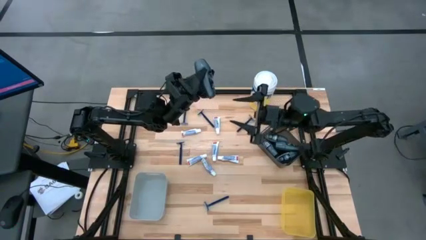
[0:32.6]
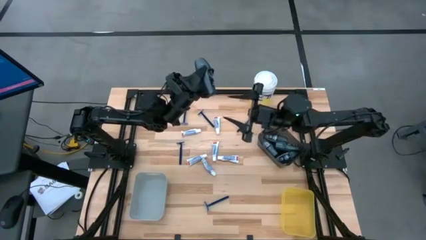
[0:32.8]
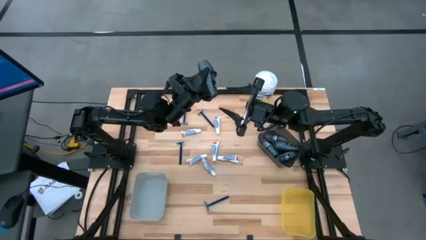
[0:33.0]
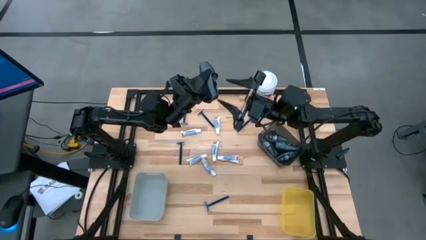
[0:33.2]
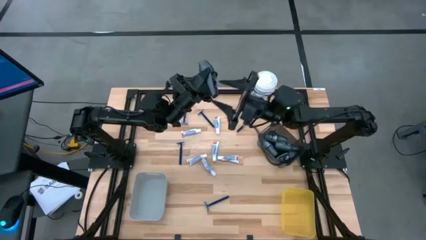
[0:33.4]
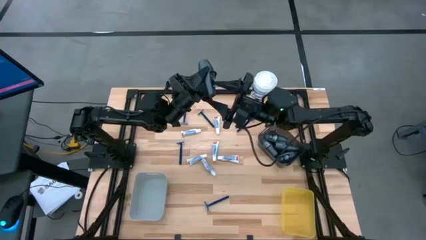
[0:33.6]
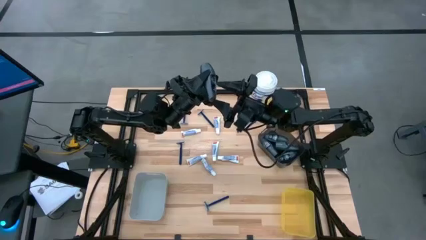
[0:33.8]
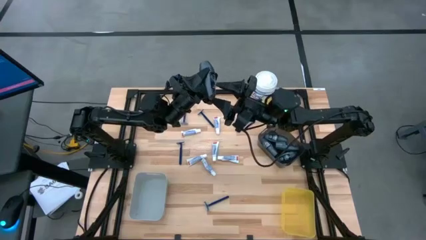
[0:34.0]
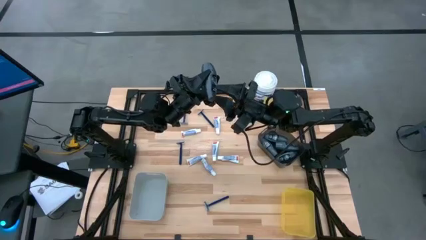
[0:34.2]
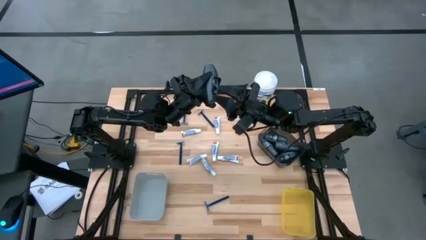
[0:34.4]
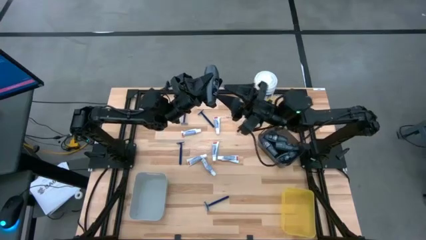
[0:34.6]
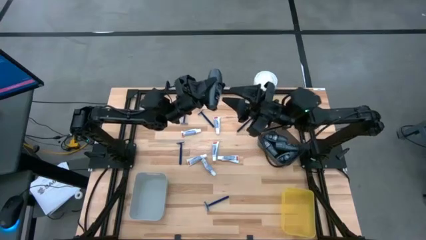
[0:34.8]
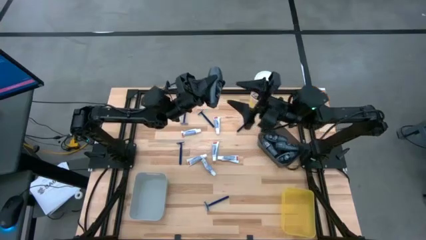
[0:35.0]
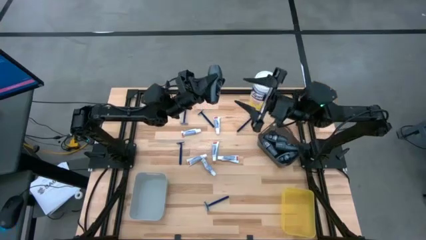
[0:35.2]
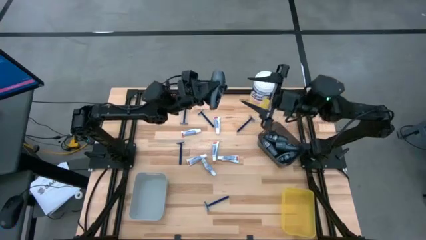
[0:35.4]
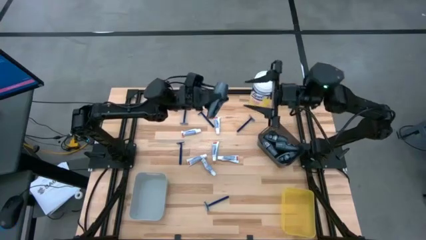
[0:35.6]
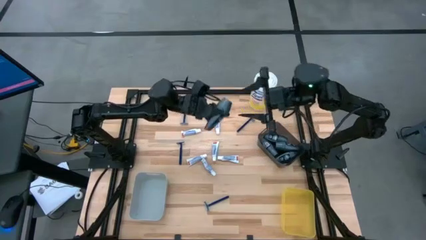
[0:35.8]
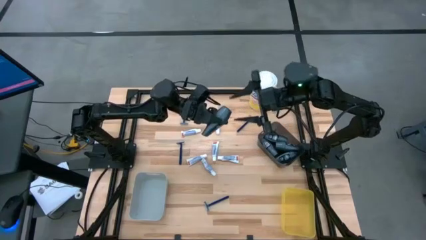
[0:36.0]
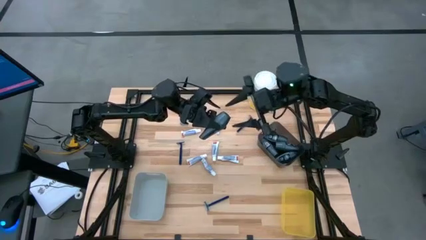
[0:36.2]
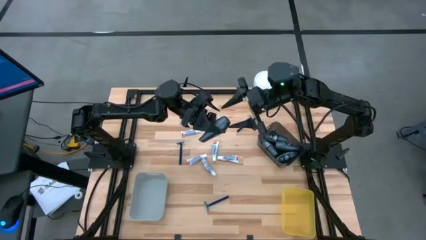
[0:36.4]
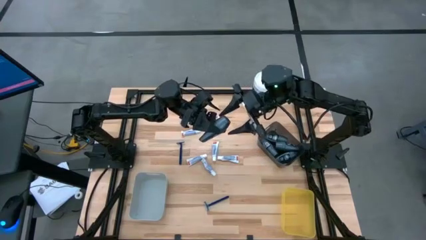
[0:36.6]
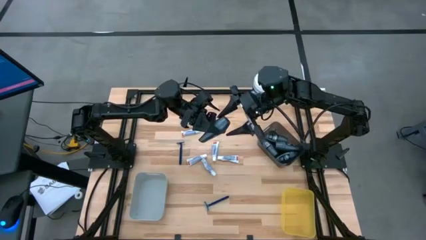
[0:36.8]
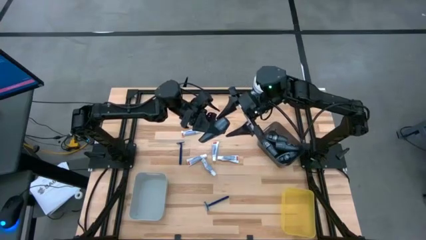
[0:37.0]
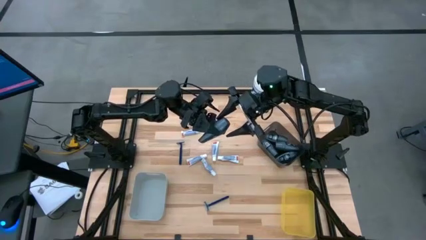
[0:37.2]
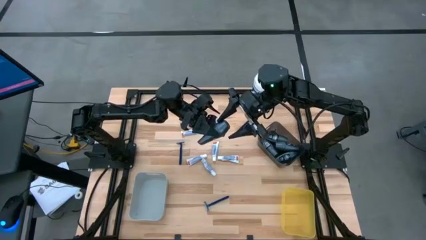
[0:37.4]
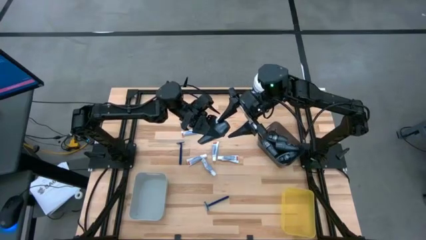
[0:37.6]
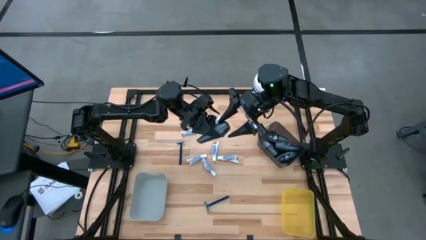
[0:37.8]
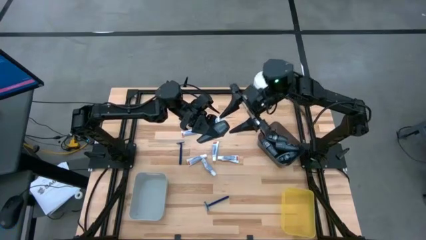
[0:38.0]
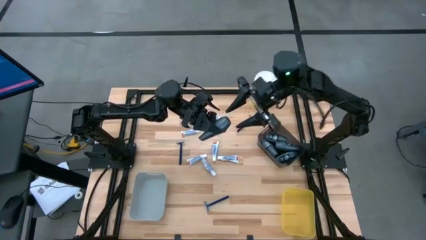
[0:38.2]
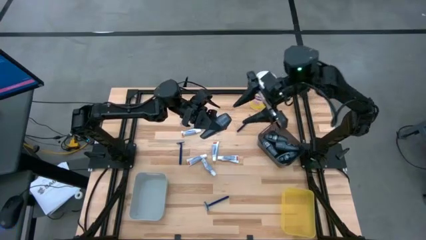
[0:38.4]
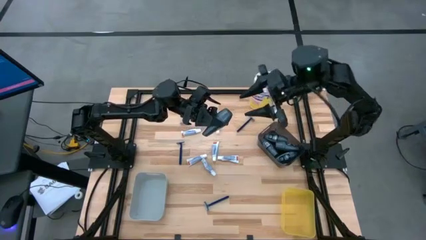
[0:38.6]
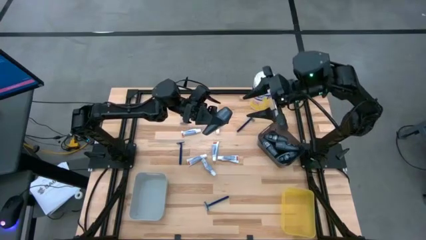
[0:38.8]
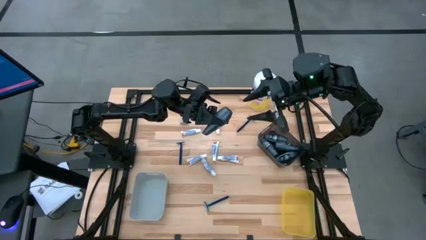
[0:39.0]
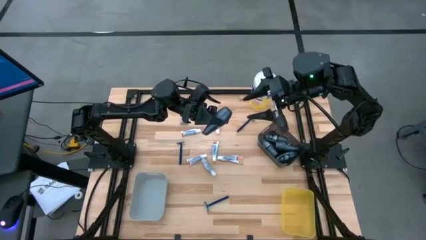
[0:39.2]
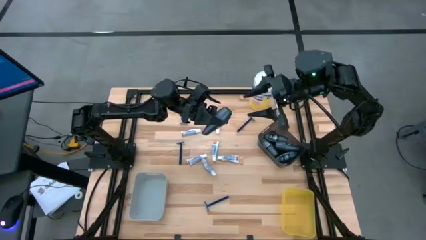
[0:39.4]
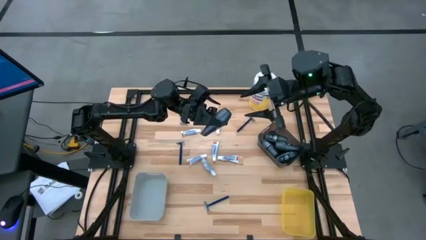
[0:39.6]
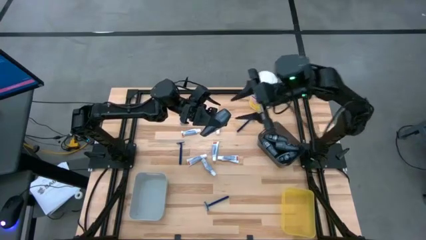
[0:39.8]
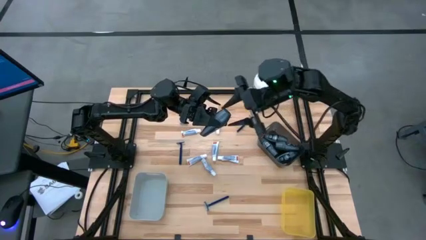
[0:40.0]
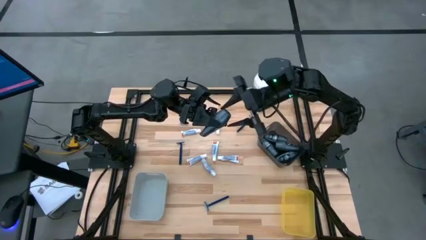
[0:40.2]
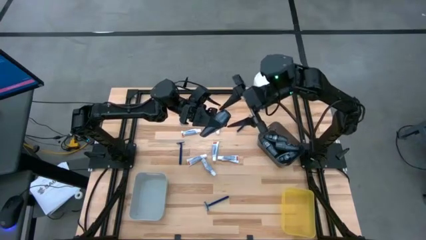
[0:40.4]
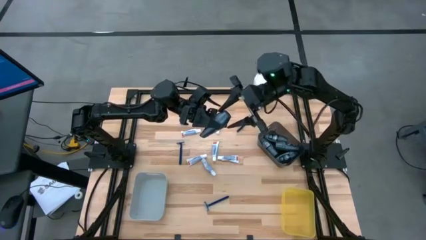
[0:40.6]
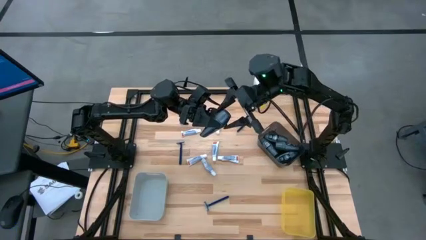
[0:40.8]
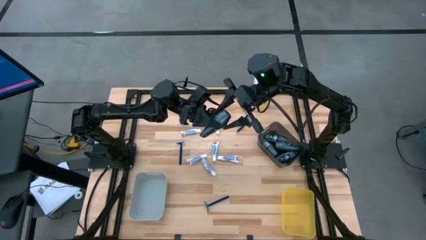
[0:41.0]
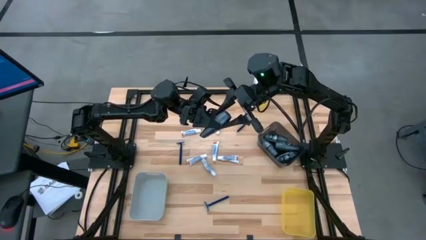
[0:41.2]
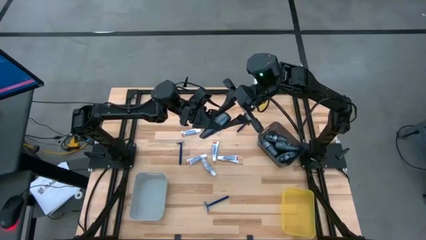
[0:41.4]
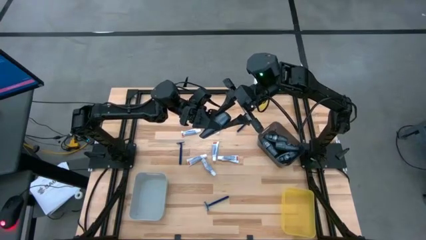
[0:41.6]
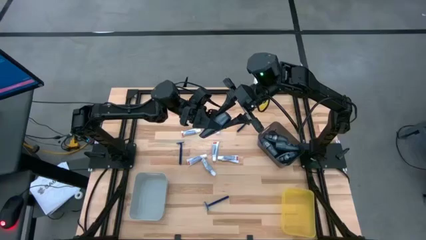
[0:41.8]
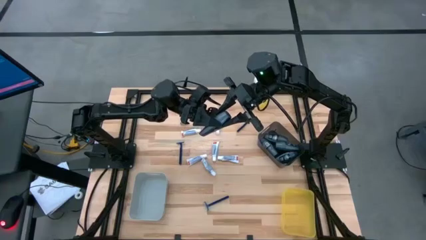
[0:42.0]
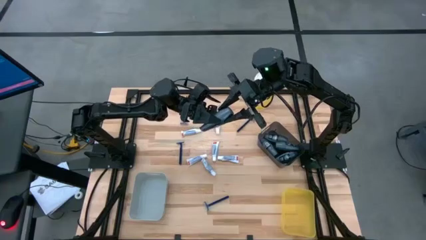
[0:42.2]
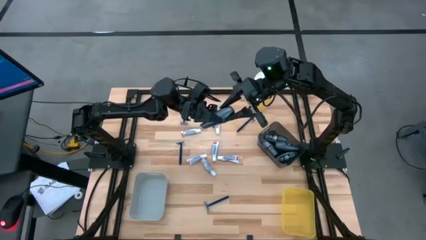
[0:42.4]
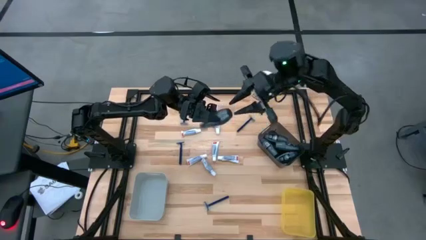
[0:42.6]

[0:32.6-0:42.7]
Task: Pick & Place Travel size toiletries
Put the gray deodorant into the black bin

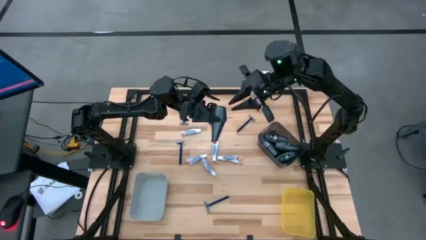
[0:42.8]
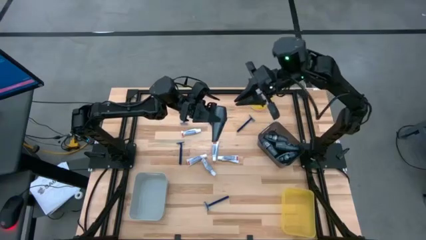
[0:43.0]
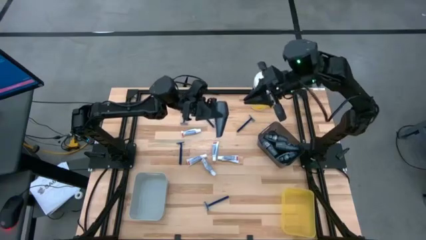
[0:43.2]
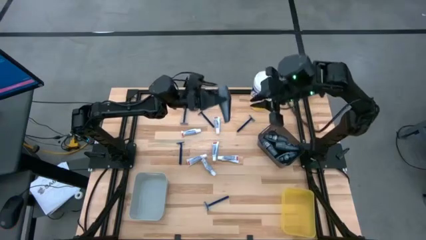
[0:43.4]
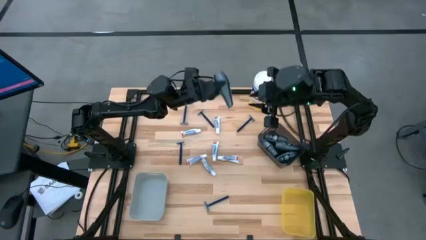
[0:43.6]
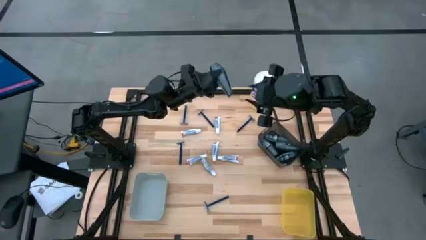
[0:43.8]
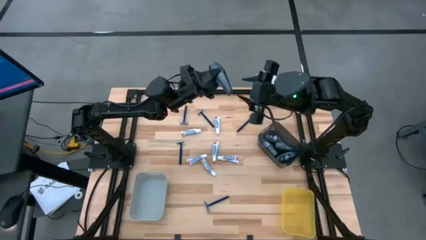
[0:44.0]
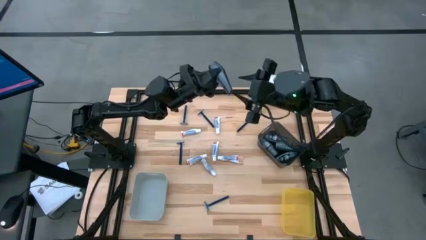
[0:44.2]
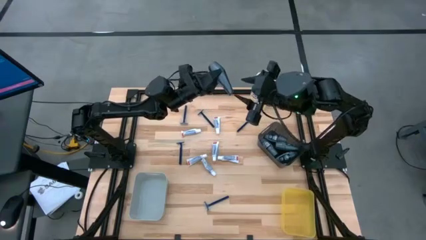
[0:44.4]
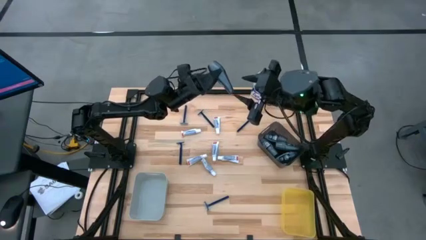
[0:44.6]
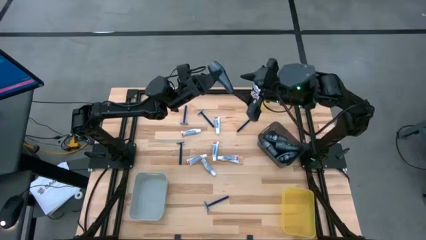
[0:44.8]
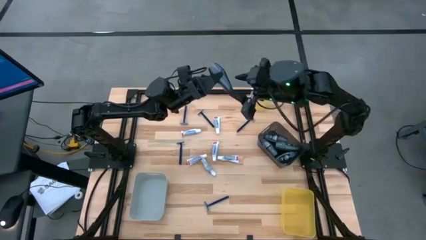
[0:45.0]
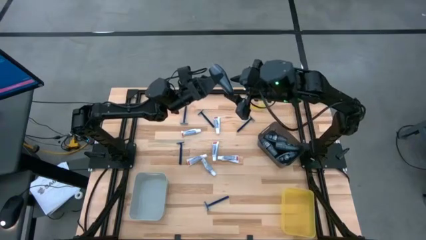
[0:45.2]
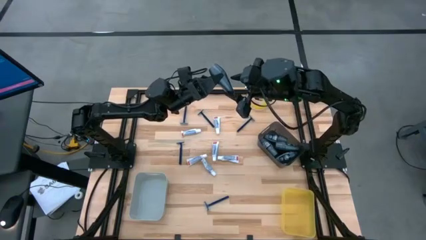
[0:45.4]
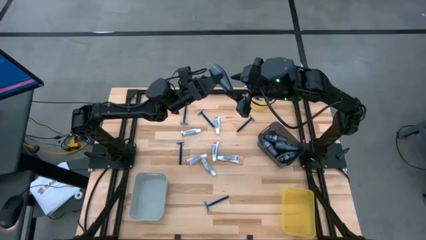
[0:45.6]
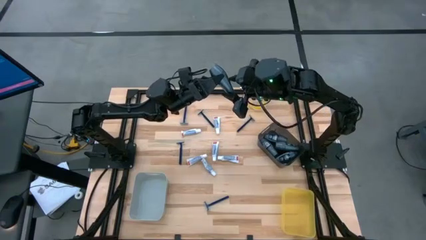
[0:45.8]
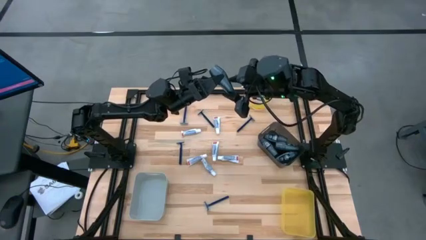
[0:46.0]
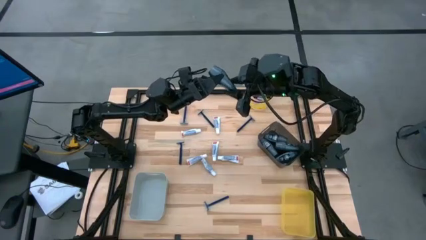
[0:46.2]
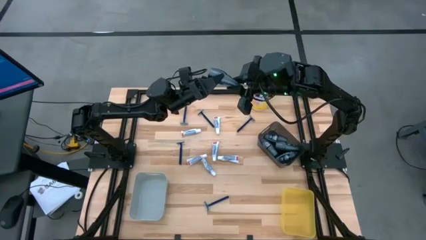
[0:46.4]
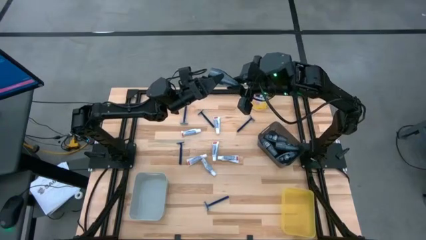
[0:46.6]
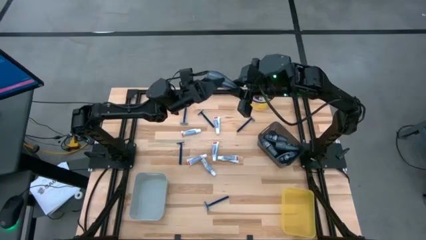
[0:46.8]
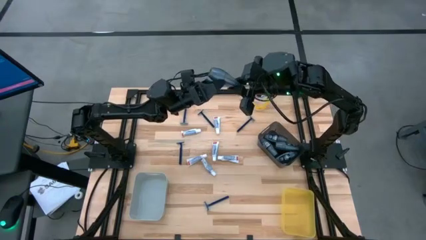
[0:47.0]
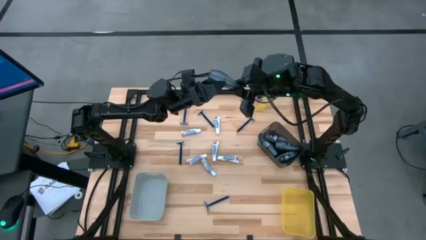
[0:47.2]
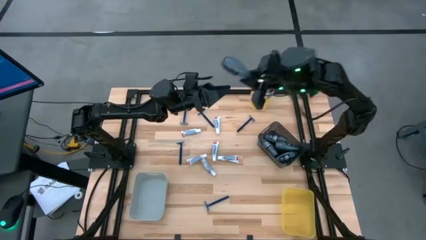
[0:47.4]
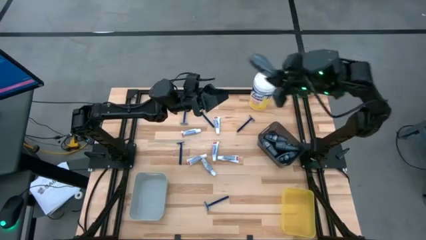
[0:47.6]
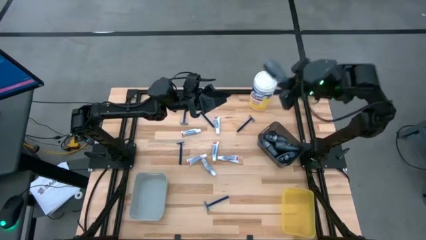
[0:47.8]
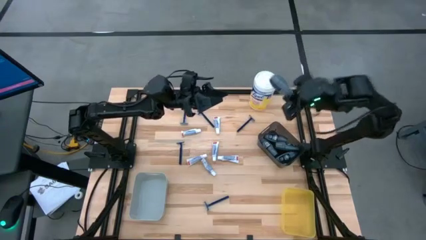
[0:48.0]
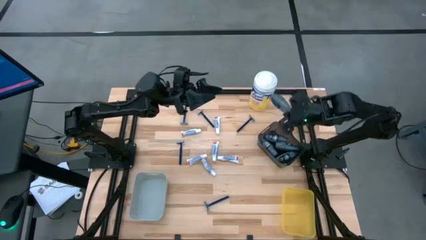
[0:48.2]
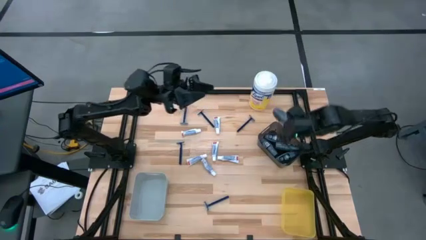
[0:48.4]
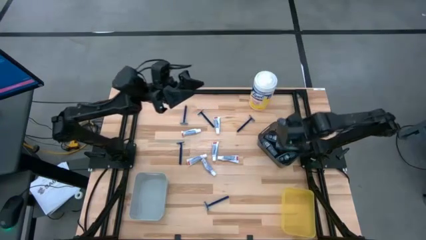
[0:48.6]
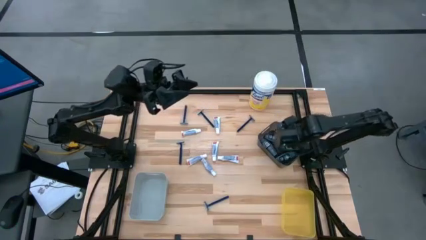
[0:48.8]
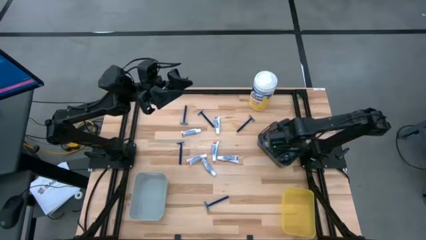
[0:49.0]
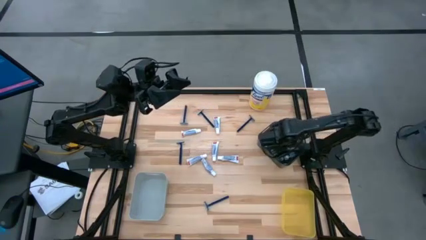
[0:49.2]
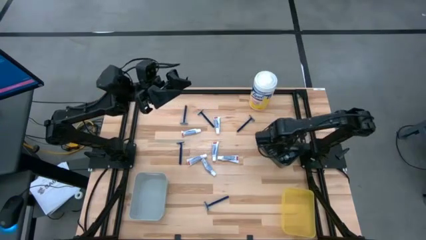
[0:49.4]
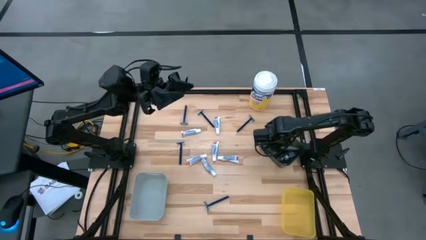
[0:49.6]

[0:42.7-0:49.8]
Put the gray deodorant into the black bin
